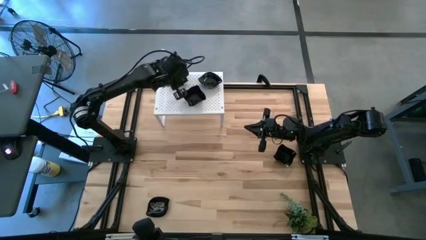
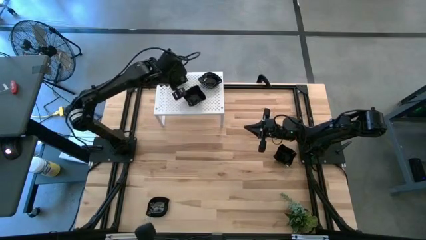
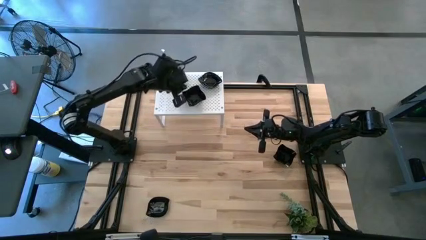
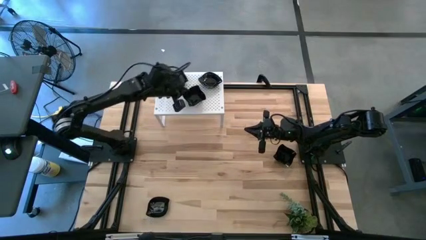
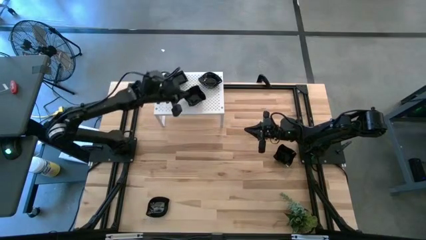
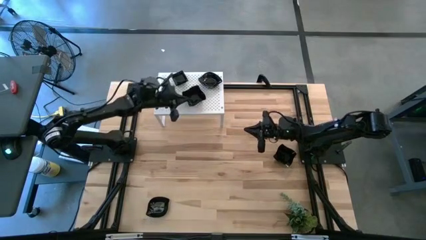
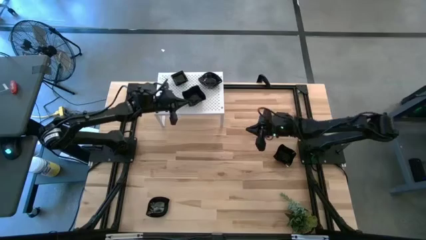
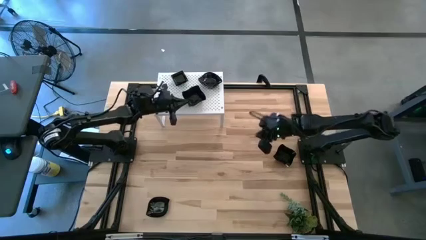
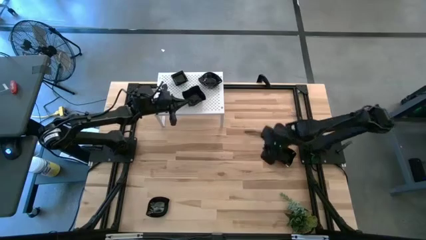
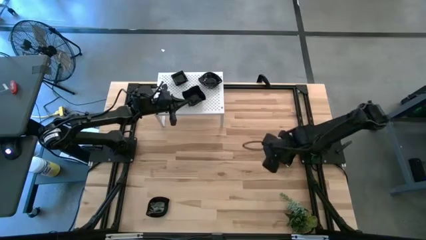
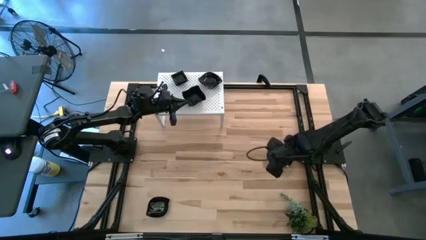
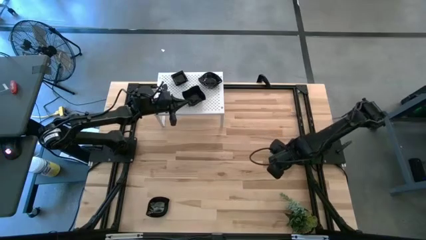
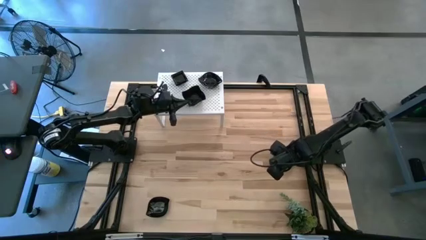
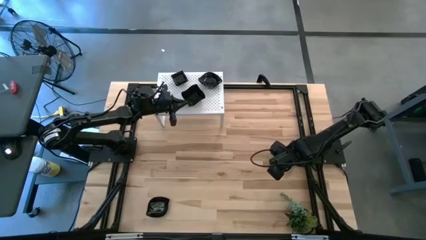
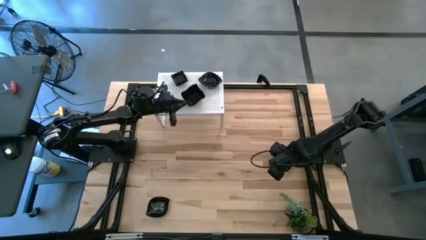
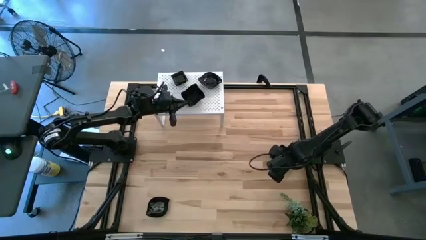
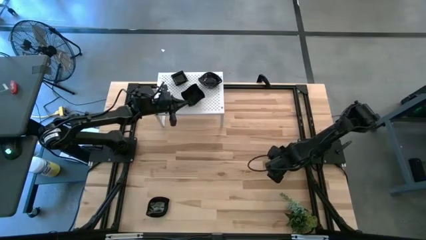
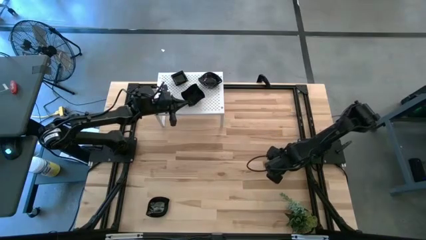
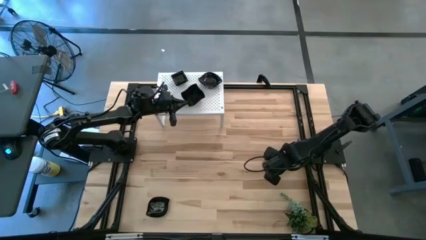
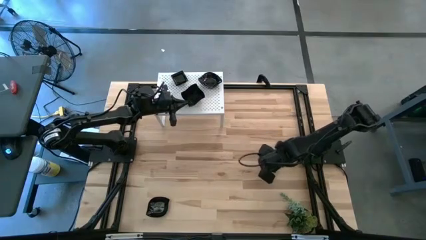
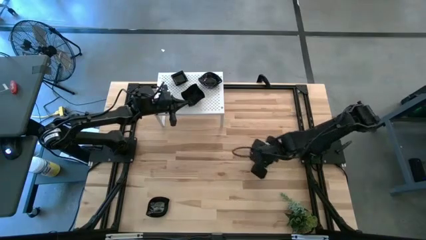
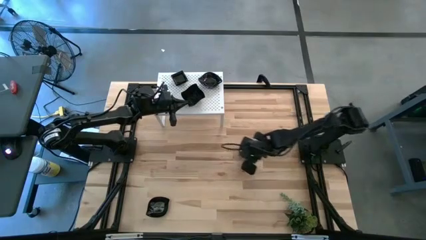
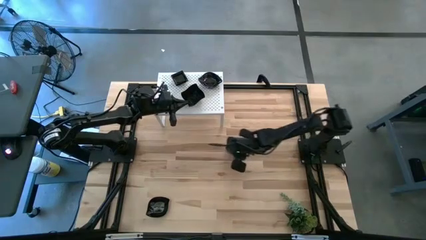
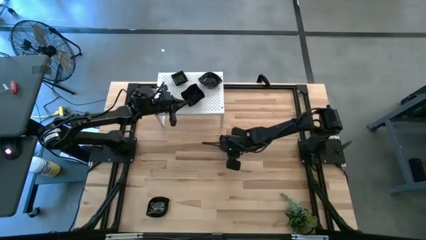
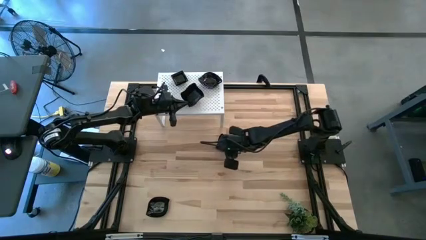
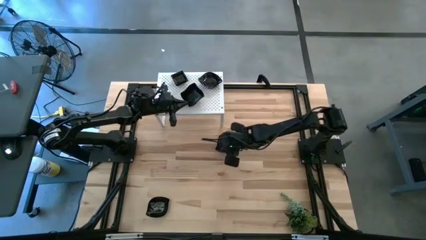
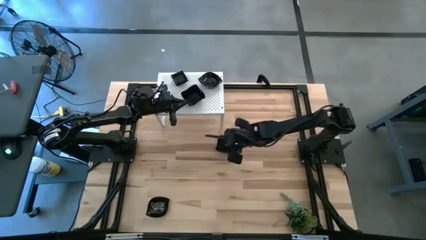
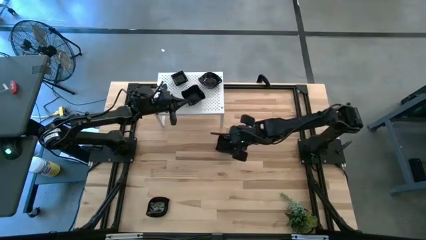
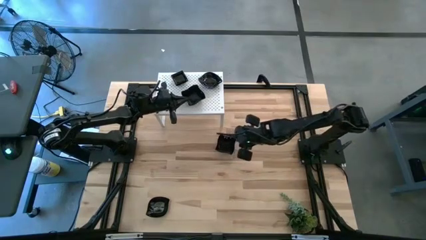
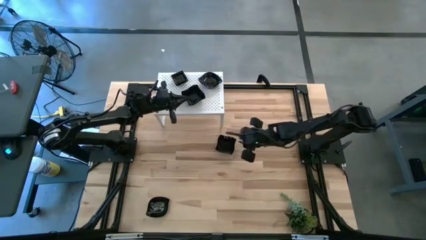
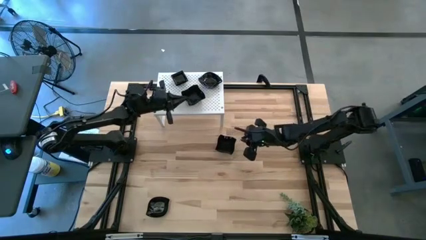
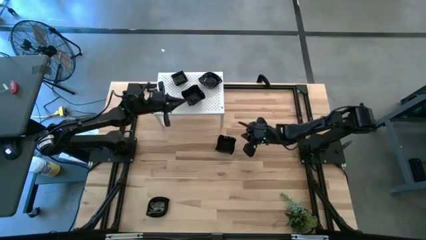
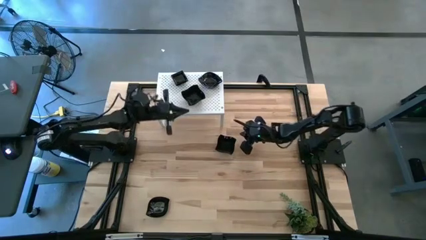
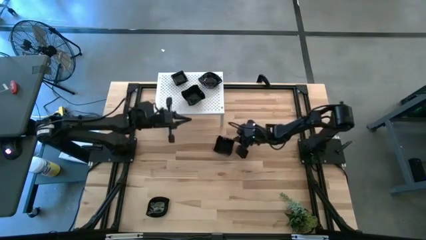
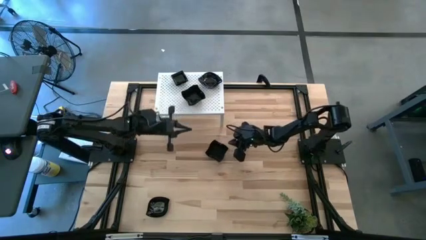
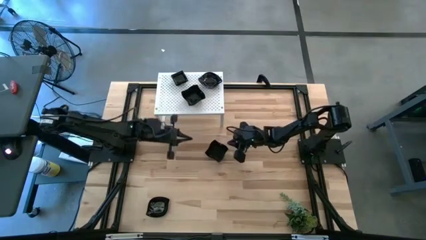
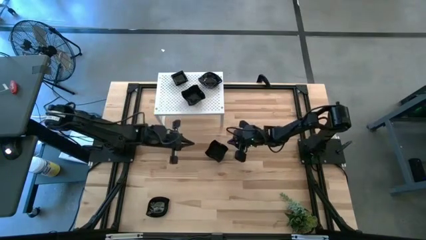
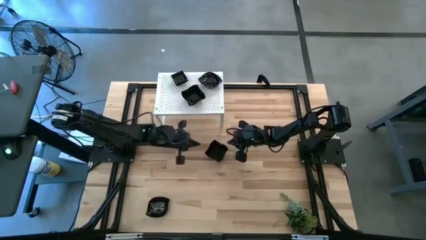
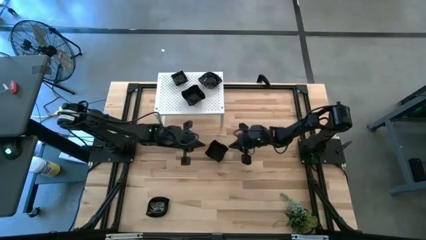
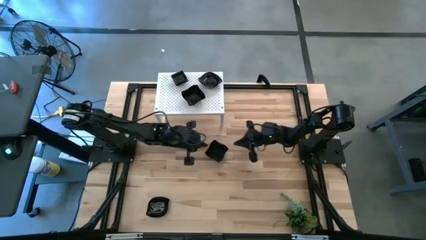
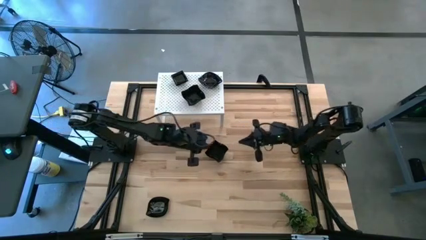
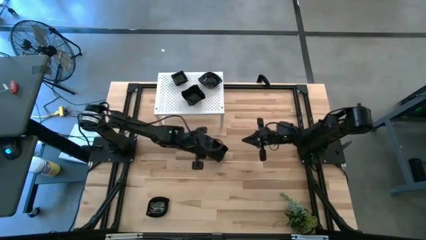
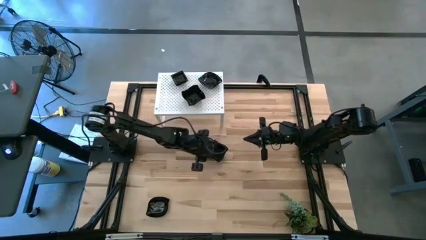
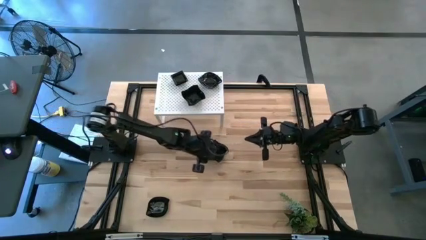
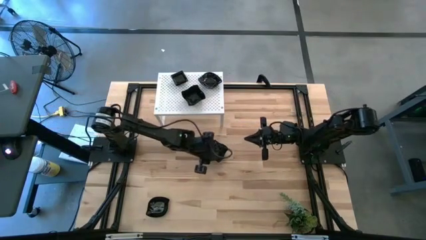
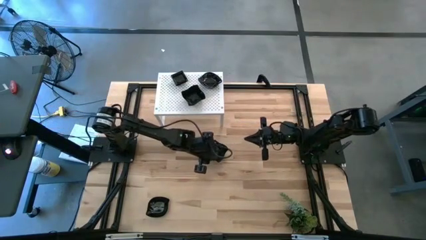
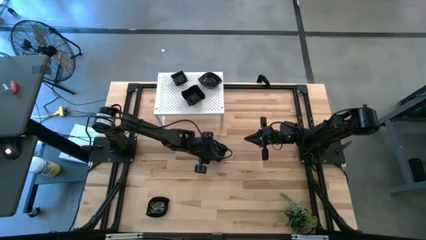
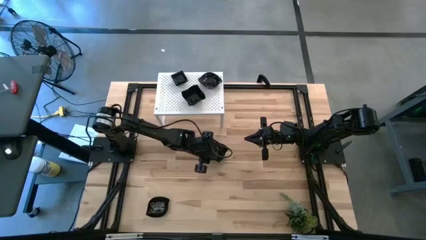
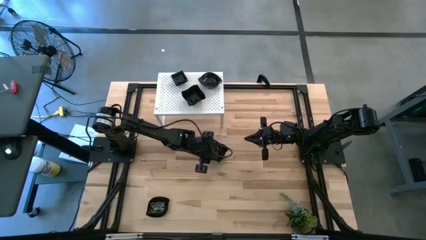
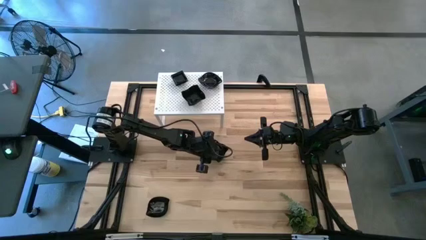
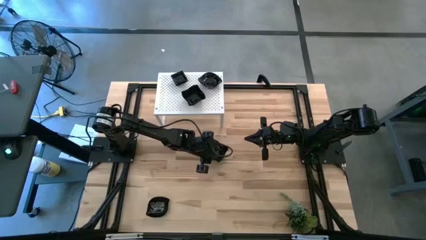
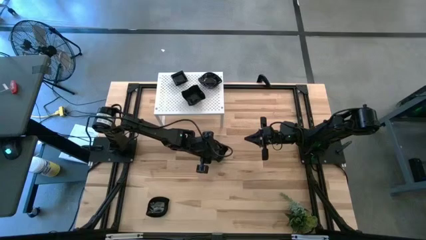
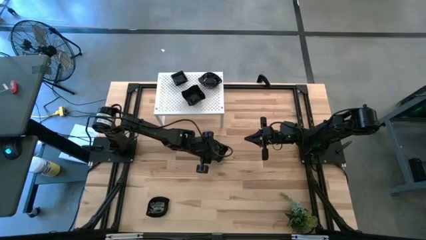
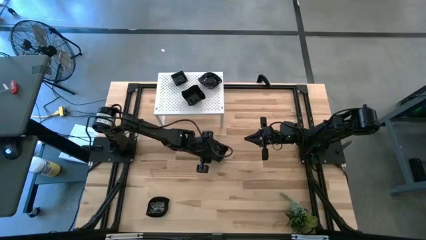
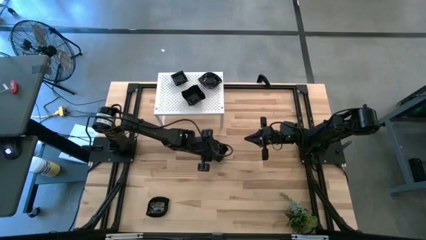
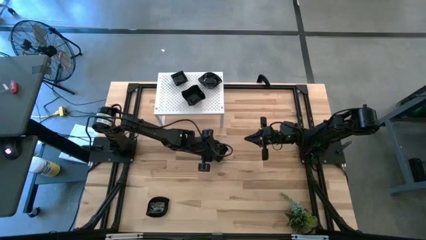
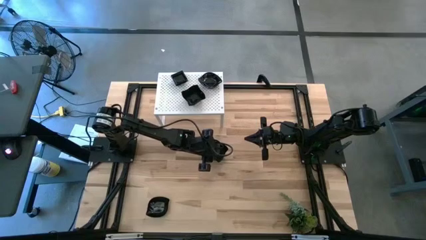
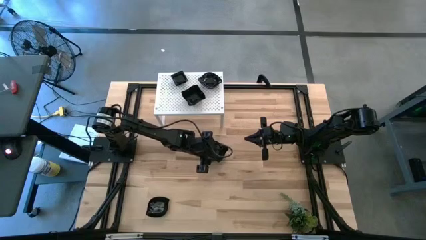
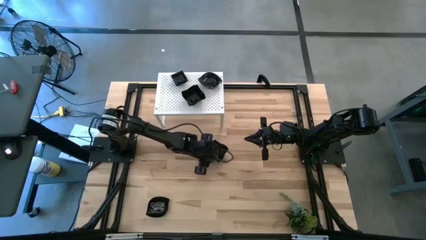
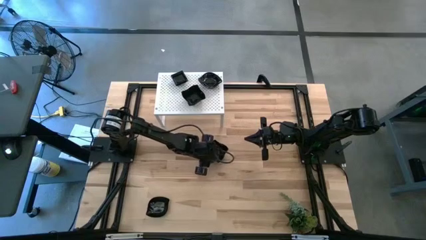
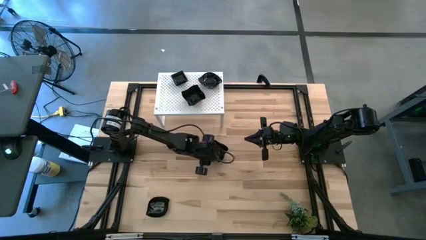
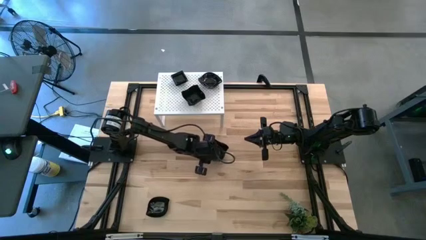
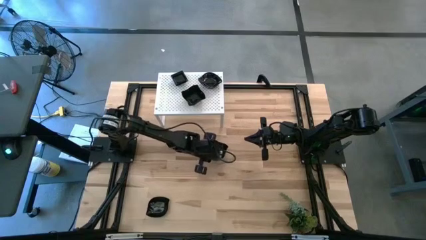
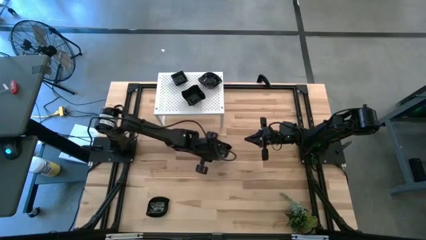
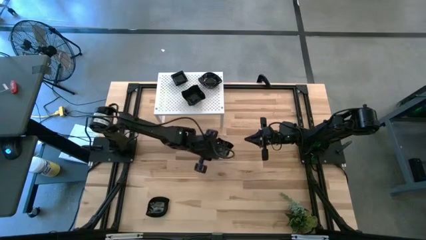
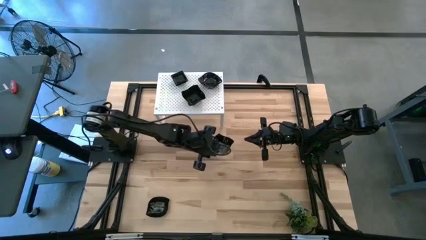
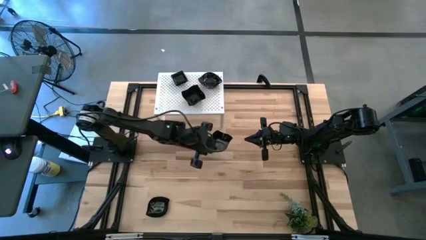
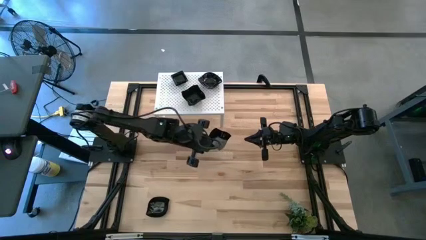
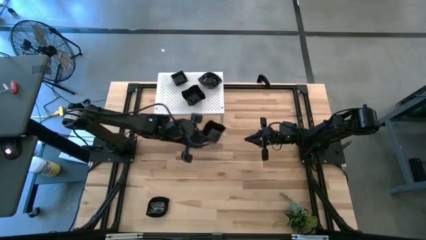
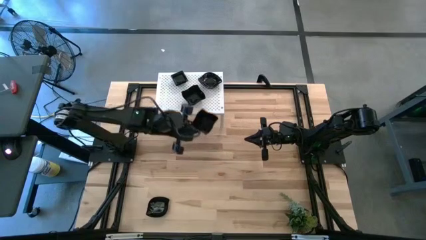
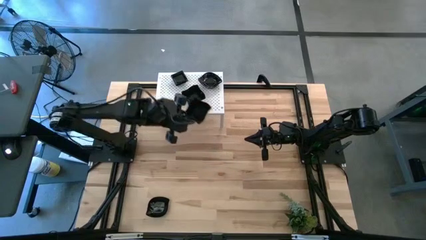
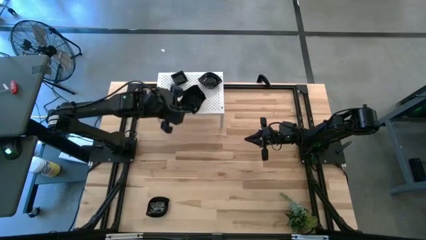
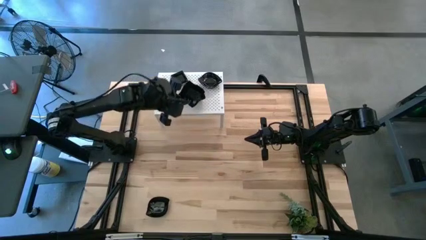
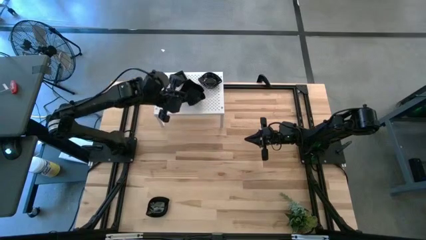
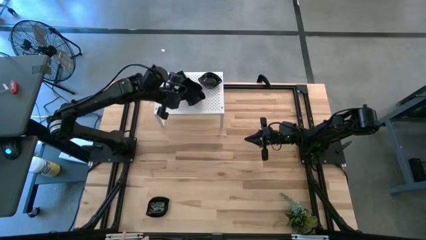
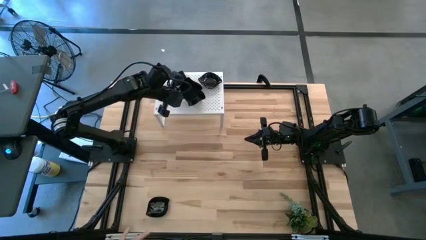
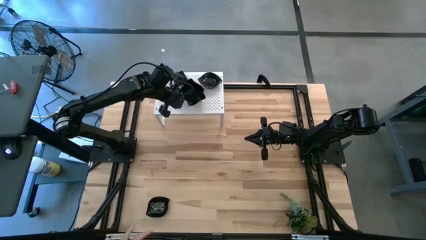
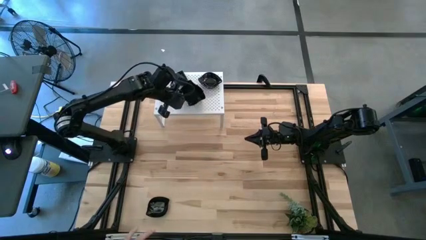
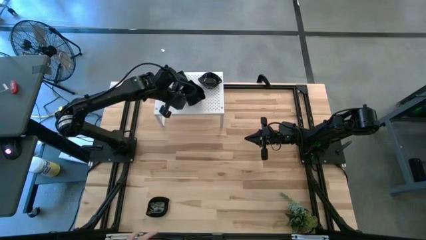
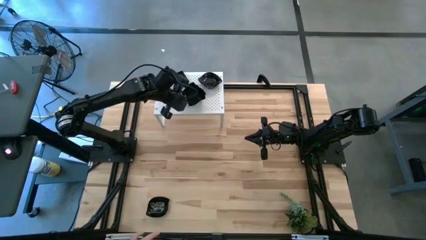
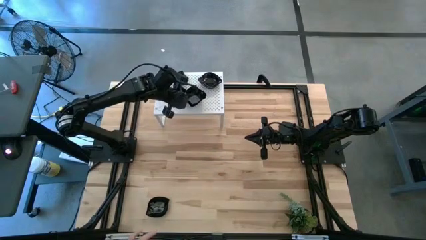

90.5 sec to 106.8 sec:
Task: Pick & Place Mini shaped plates
Stack the black distorted square plate on top of the black distorted square plates on the shelf
